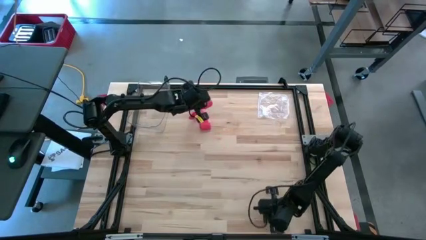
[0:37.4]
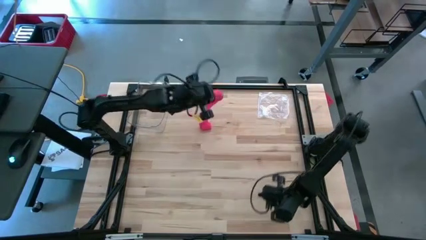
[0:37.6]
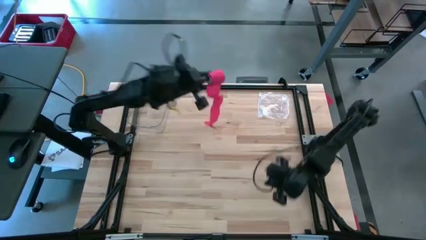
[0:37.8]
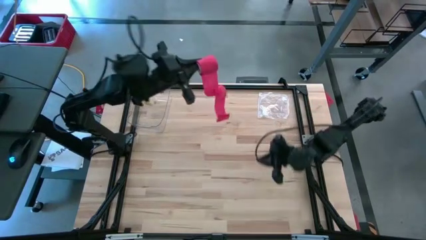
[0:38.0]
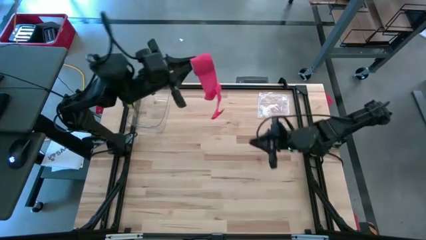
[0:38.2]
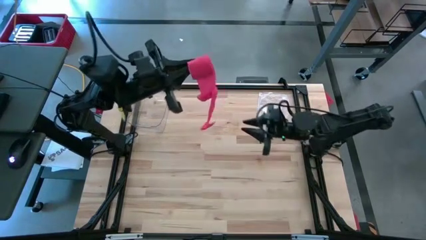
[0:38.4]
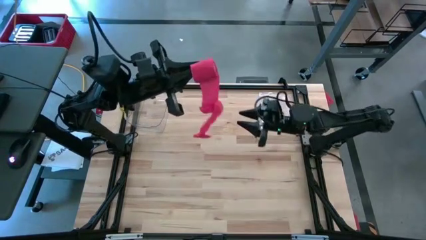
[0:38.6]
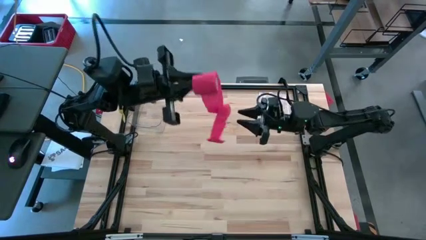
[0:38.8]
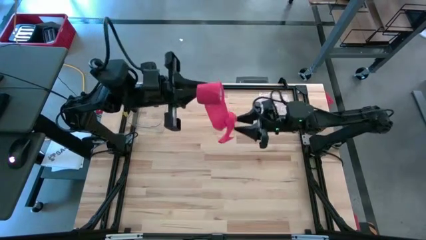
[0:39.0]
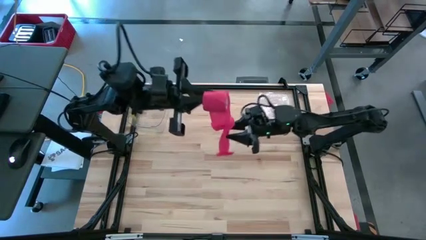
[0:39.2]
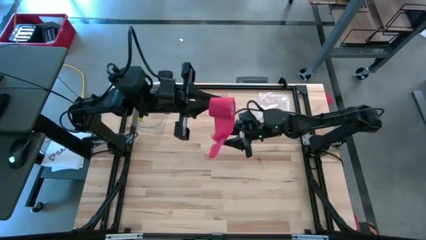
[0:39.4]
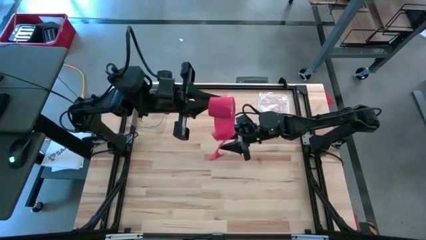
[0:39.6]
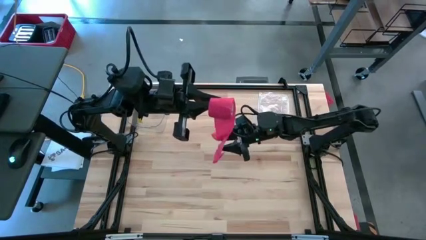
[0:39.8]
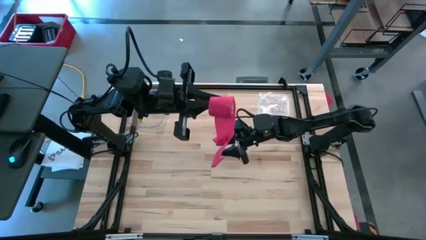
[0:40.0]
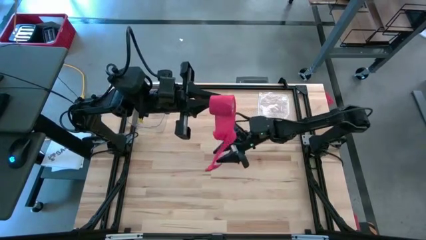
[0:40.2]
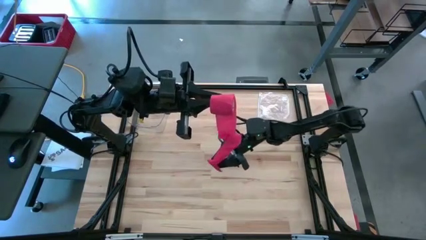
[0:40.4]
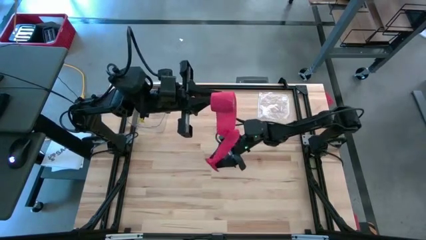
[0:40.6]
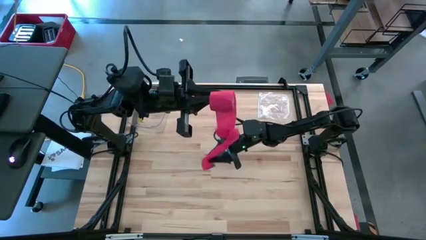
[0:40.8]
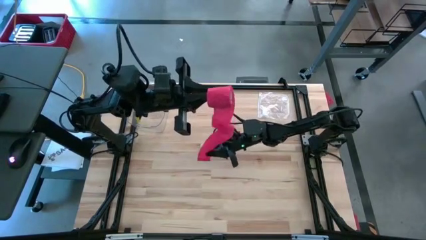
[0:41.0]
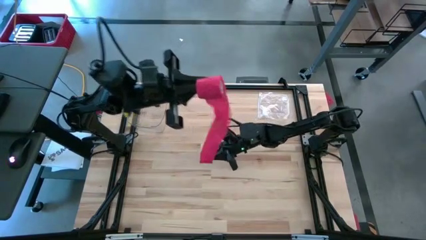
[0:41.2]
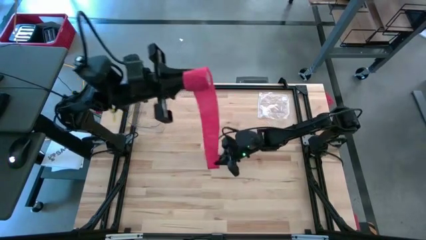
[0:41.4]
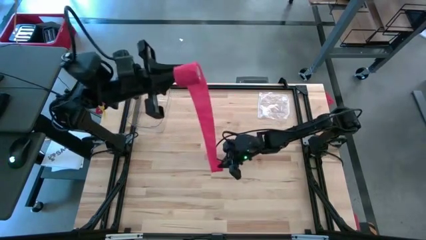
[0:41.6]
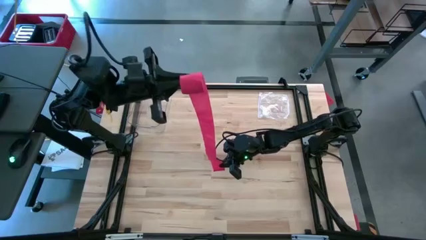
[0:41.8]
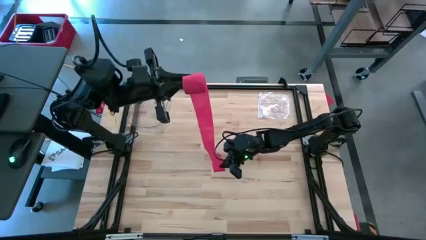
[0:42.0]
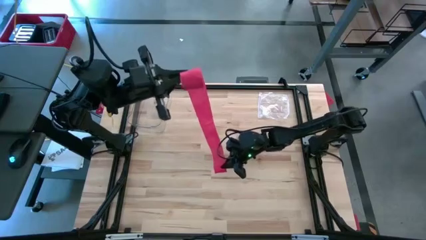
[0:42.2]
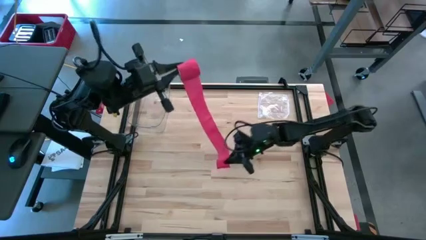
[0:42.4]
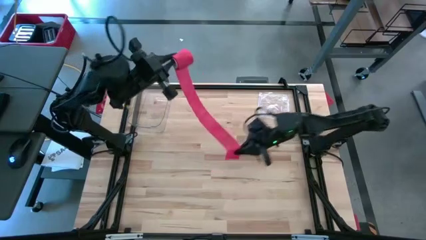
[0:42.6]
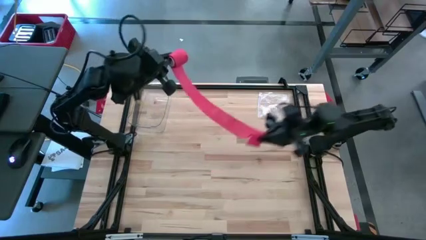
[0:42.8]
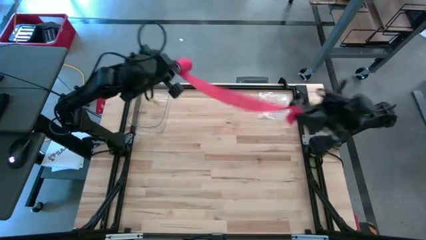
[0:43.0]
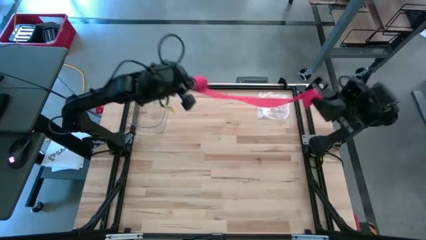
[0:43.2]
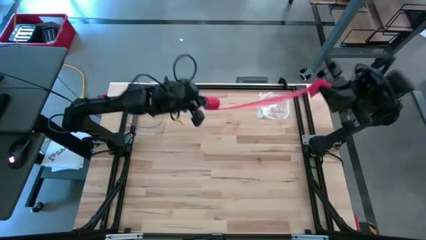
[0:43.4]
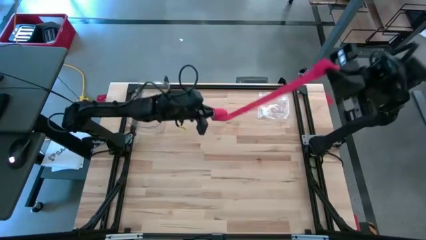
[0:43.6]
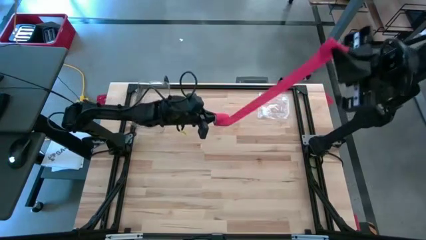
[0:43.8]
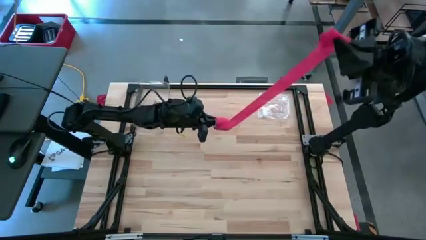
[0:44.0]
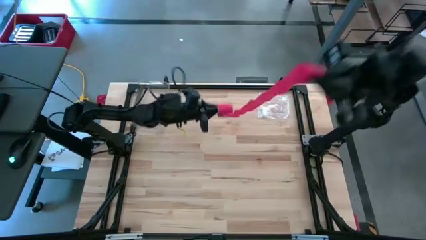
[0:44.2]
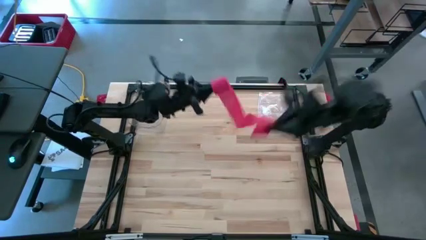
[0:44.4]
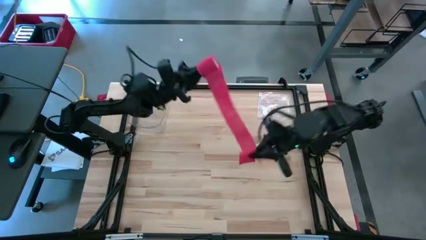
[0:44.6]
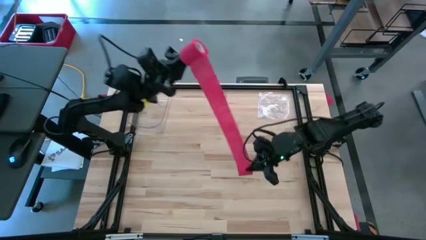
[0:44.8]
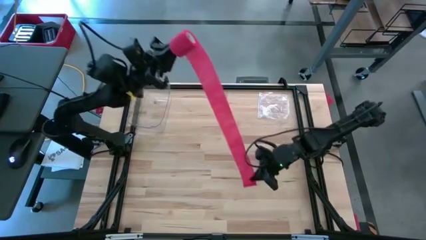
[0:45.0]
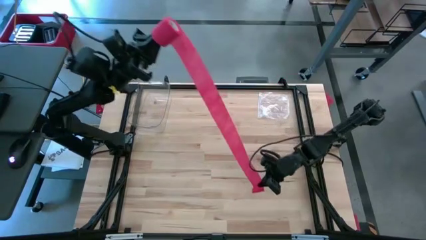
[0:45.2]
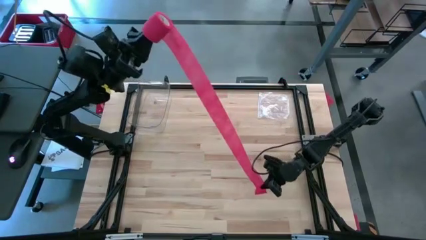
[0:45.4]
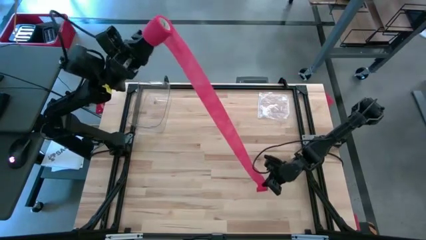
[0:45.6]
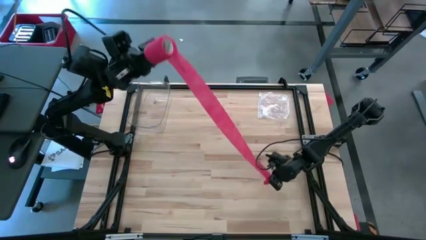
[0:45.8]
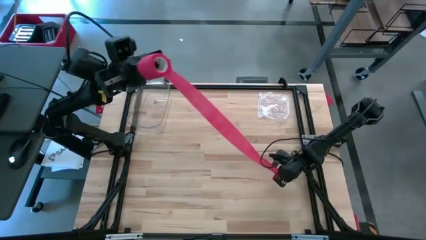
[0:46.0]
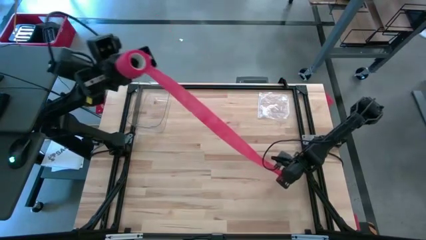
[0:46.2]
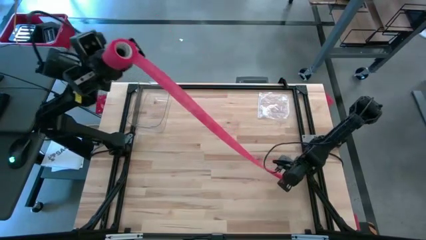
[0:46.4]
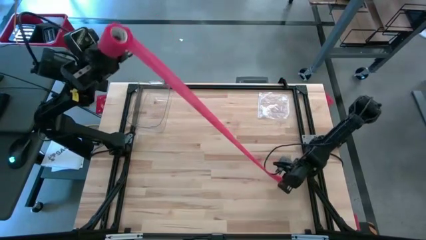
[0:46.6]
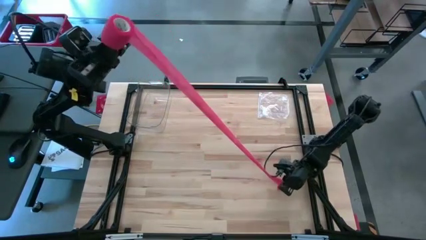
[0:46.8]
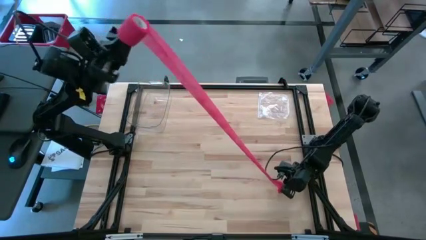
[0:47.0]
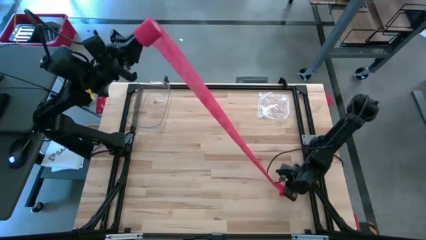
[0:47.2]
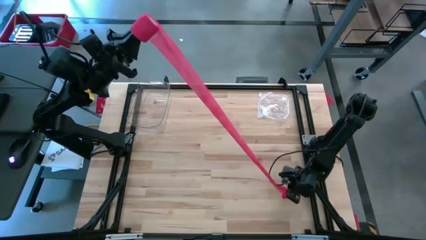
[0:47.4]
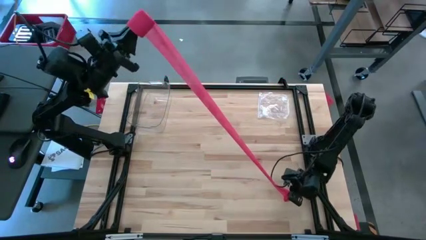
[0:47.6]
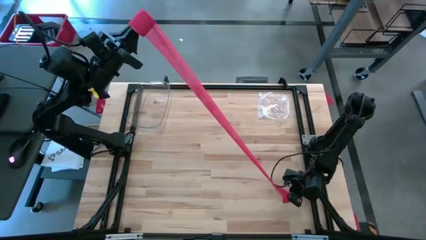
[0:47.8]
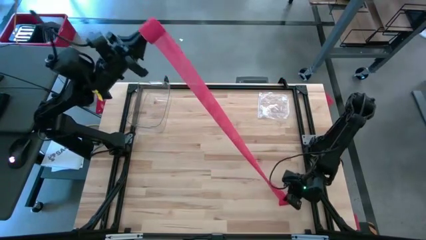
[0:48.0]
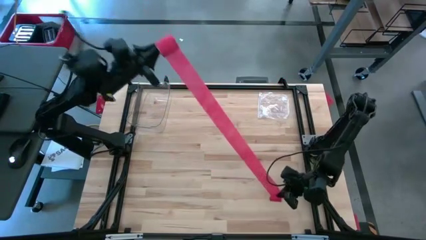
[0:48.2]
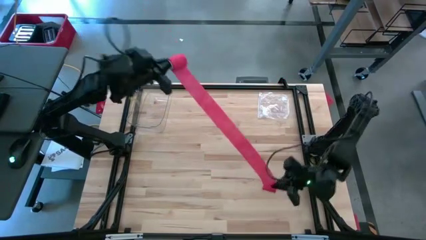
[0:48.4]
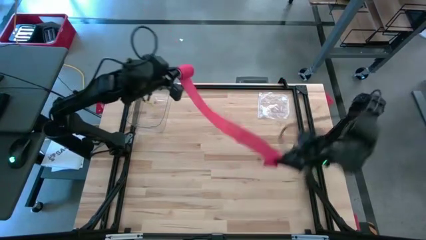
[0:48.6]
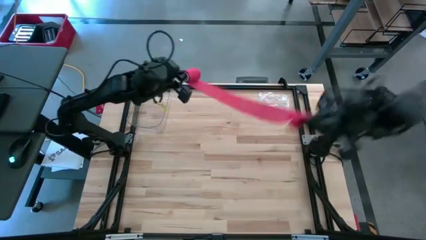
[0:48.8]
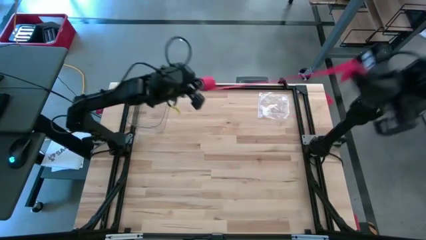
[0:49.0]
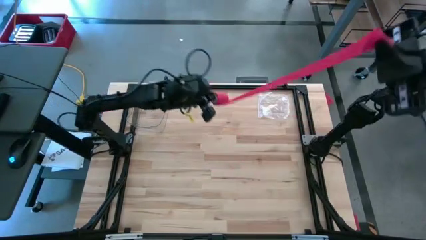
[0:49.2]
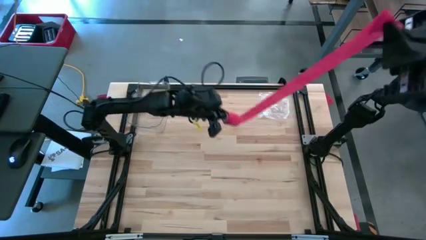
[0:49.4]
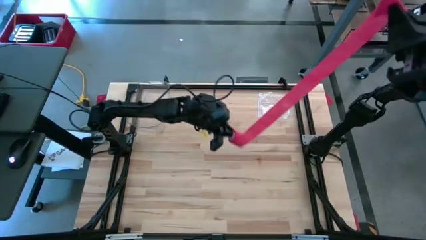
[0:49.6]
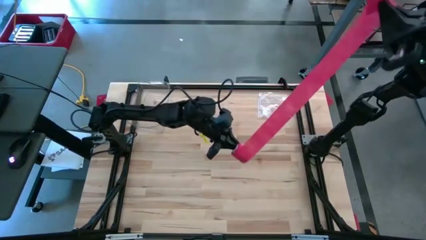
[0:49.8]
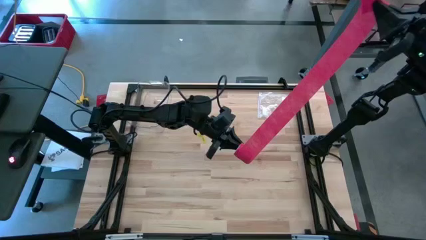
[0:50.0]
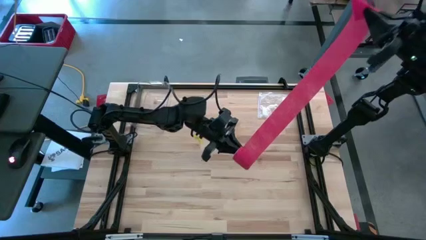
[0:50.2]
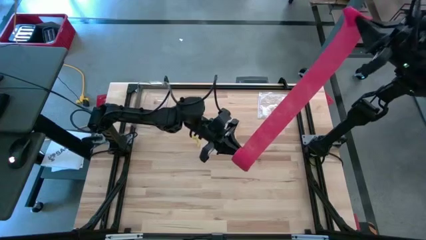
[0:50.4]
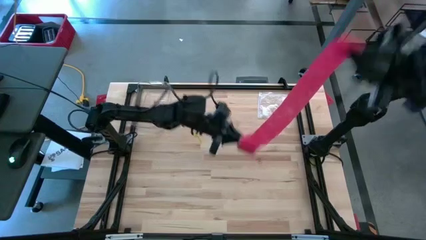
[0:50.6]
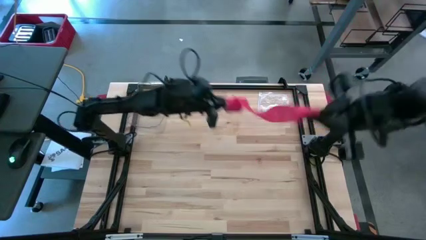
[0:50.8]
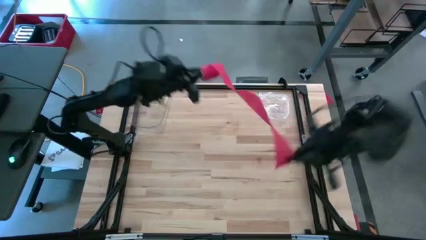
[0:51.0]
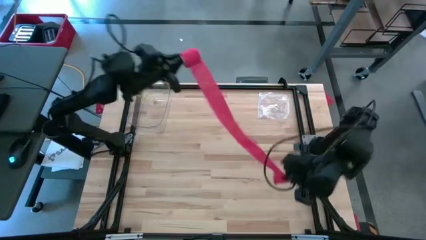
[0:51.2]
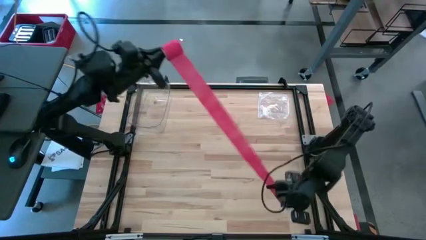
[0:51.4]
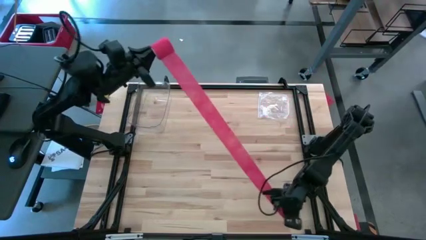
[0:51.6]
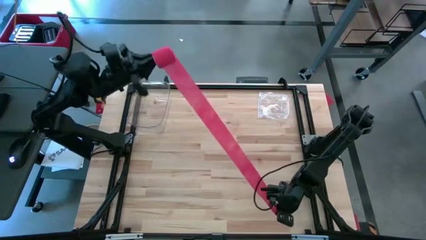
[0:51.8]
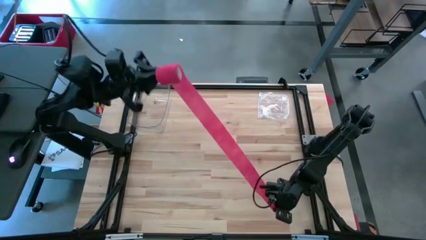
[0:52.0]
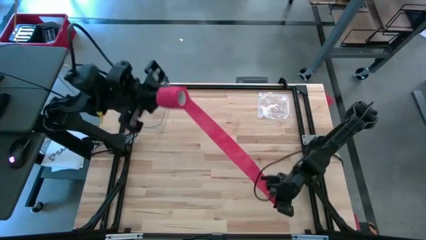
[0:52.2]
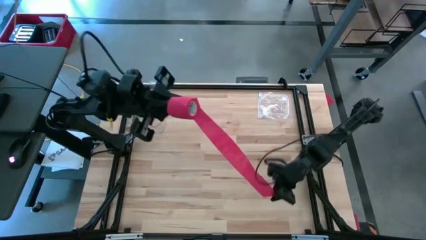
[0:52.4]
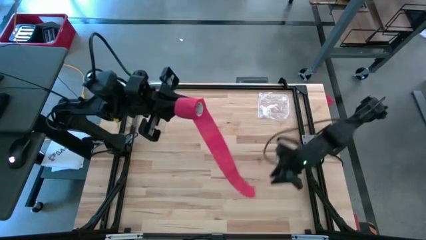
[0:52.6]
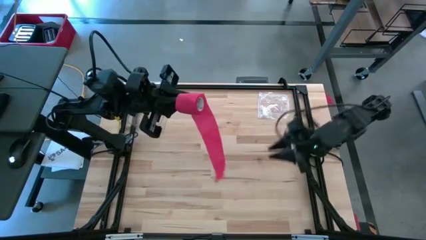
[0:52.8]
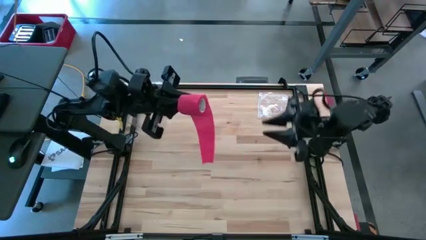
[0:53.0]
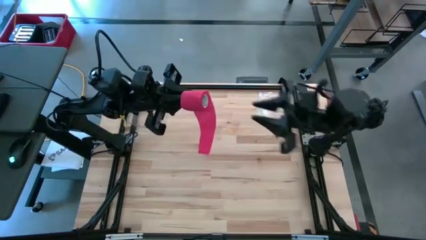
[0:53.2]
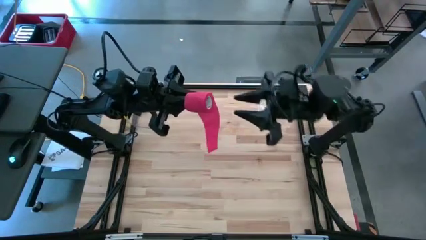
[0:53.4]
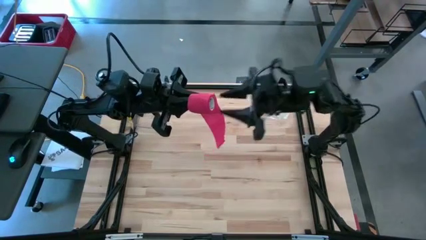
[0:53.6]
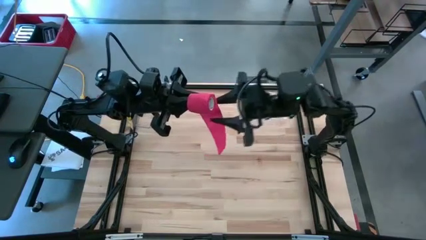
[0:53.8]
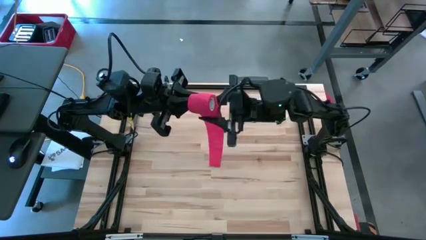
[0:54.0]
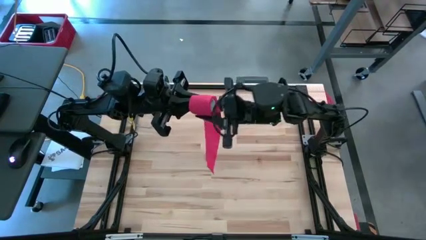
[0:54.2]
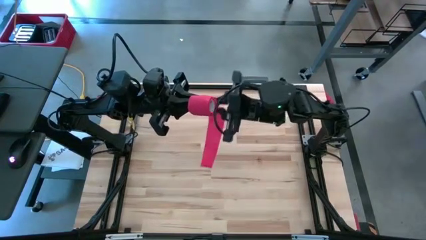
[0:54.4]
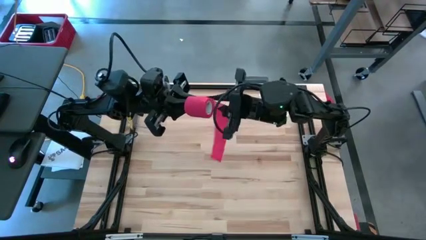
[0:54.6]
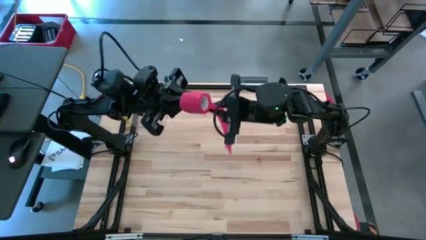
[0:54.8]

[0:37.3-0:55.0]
Task: Roll bandage
Roll the red bandage
